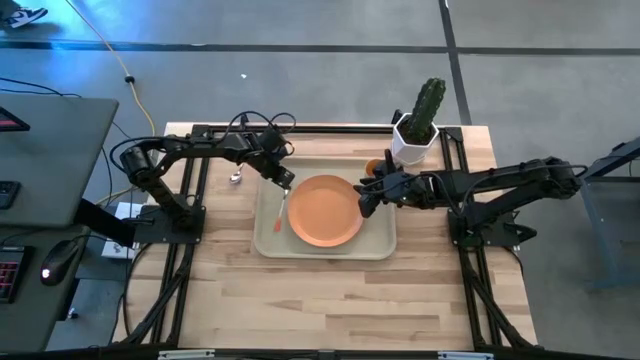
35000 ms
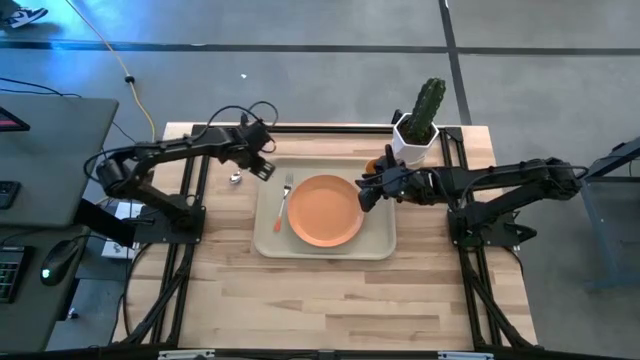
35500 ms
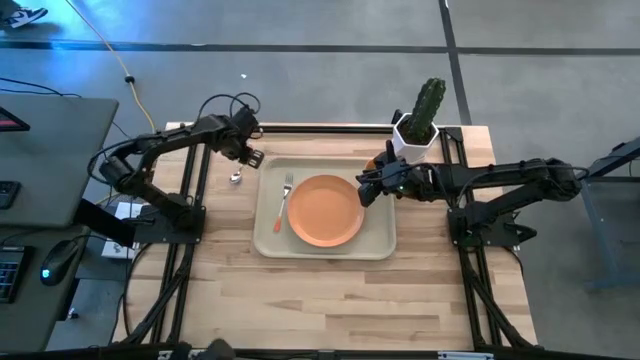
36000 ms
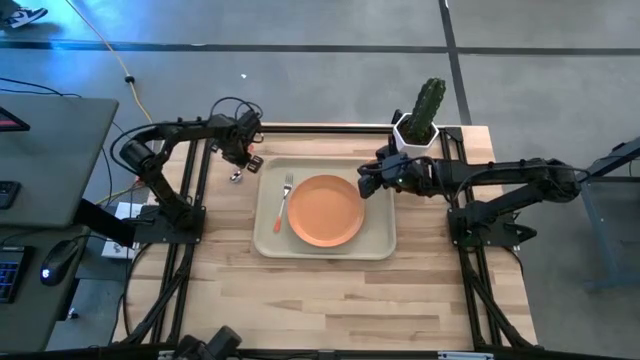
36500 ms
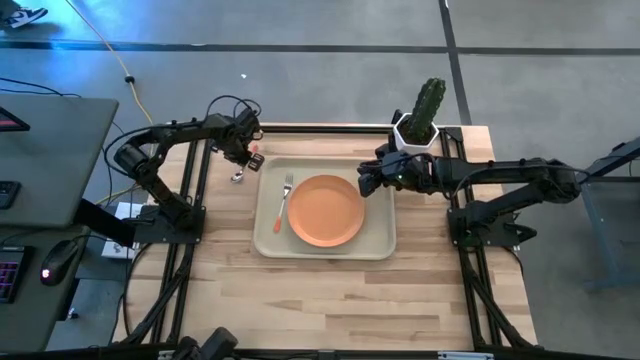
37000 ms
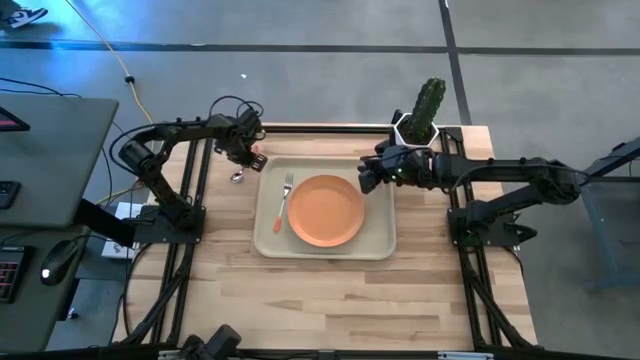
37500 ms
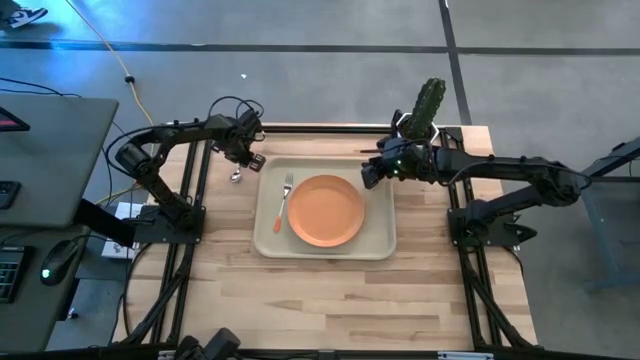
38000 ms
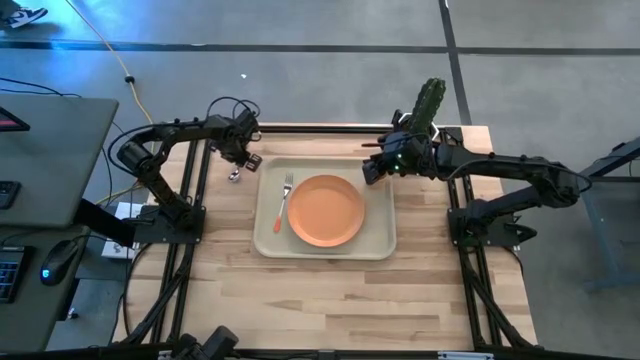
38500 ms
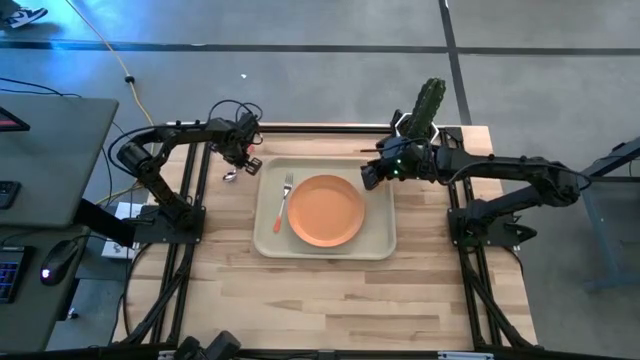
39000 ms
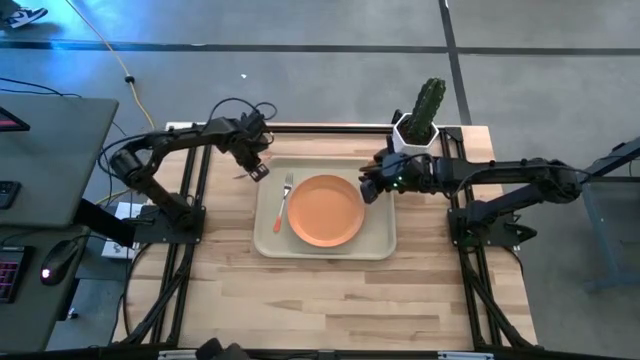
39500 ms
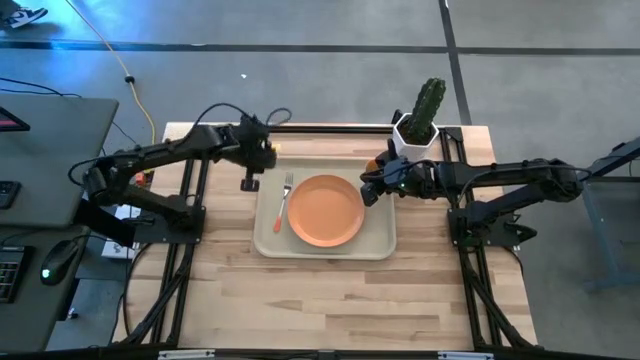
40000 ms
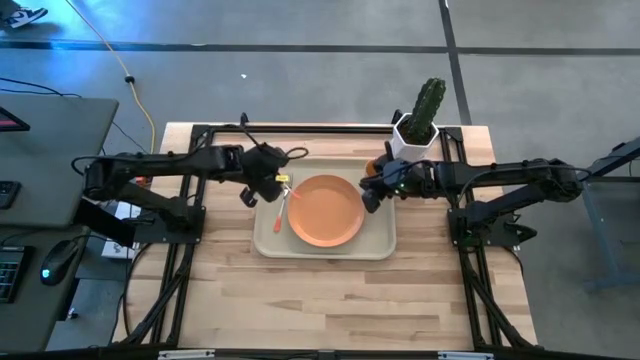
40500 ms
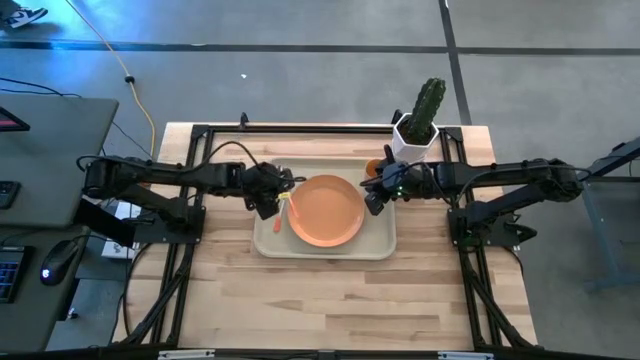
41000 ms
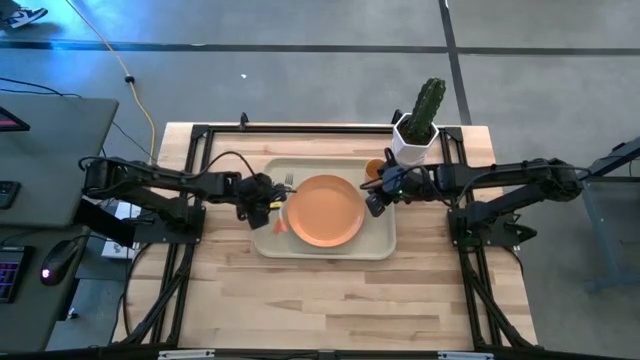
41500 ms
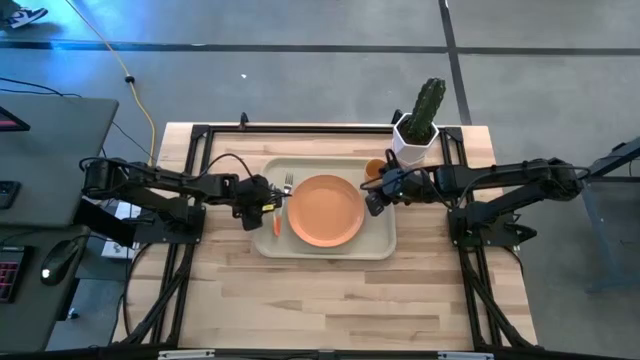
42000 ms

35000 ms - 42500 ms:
Task: Pick and place plate/cup/fork/spoon on tray
Put the orange spoon on the brown tray on the left side of the fork

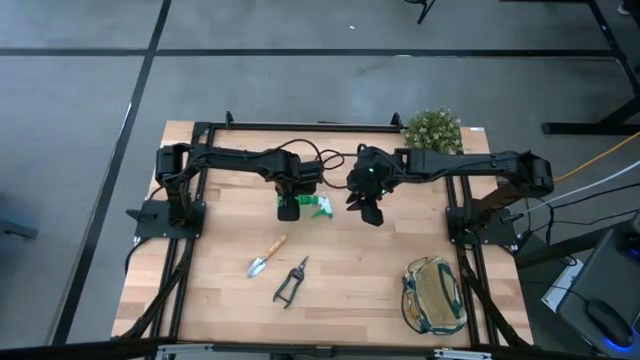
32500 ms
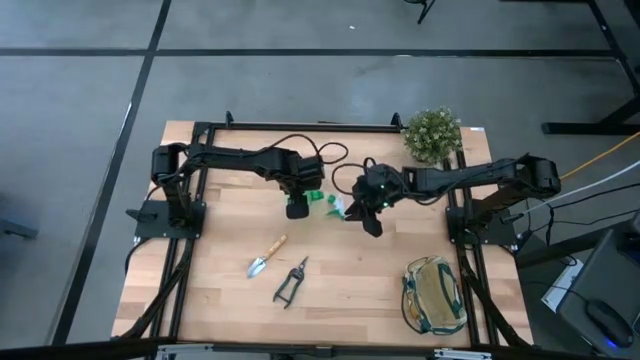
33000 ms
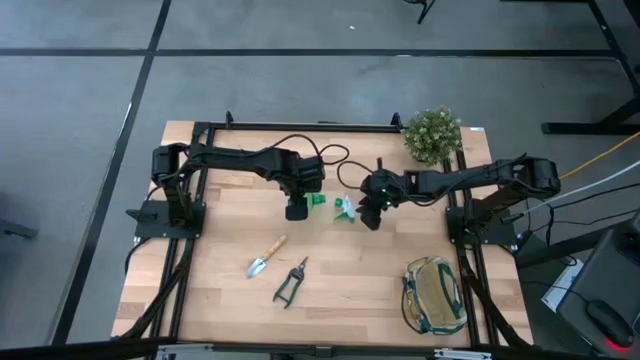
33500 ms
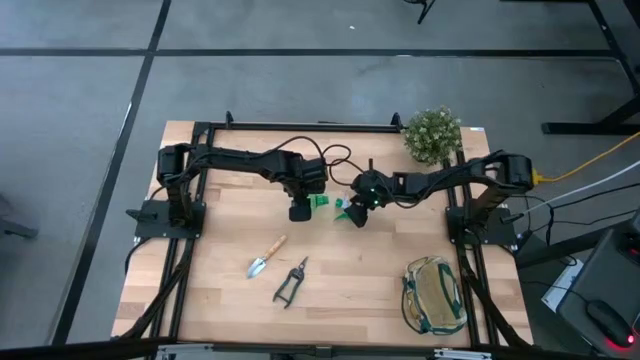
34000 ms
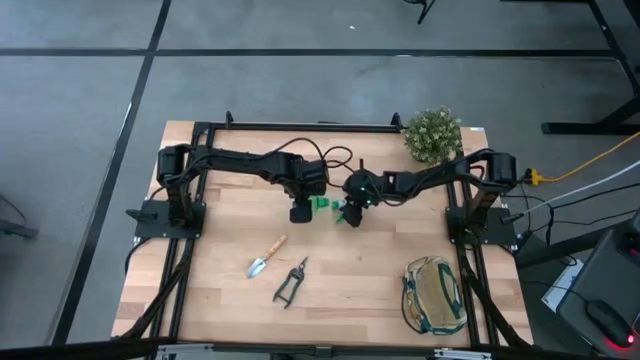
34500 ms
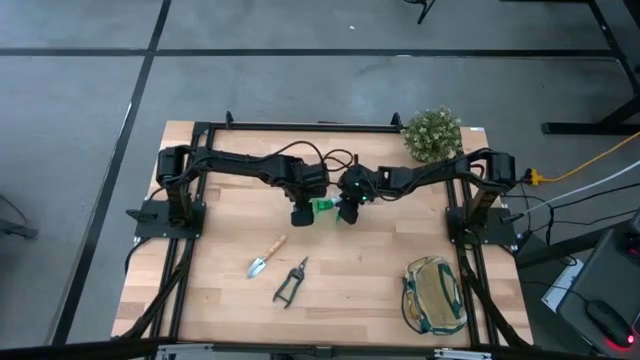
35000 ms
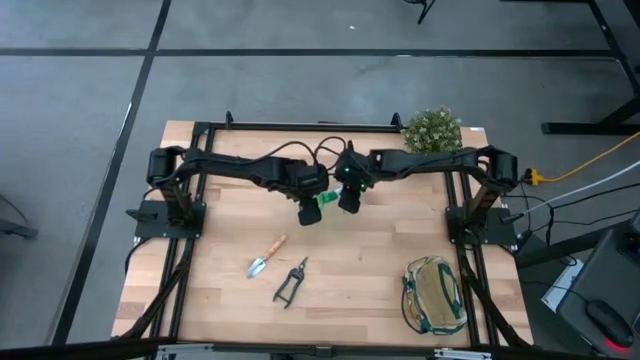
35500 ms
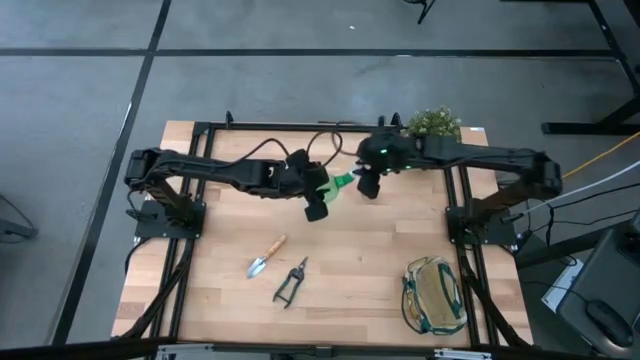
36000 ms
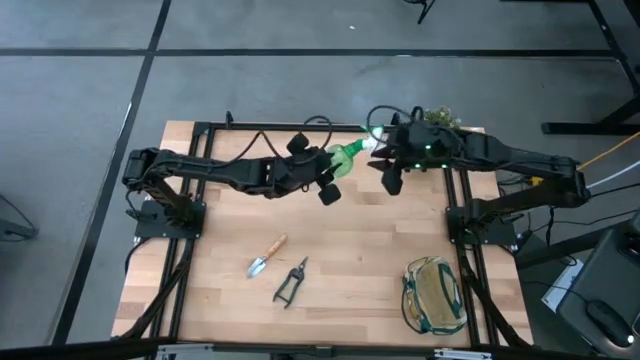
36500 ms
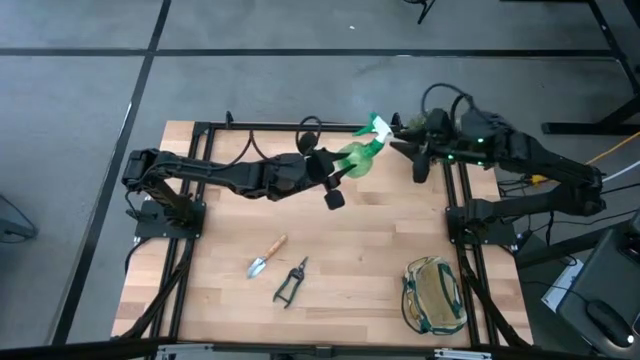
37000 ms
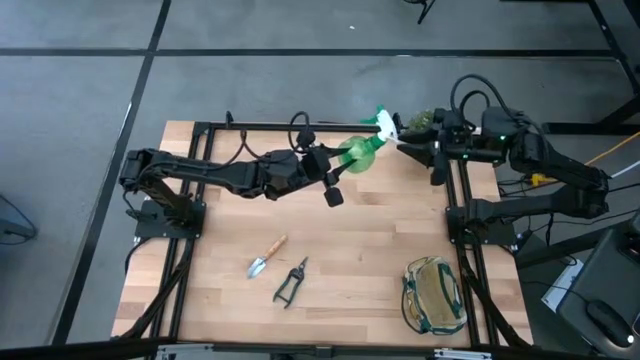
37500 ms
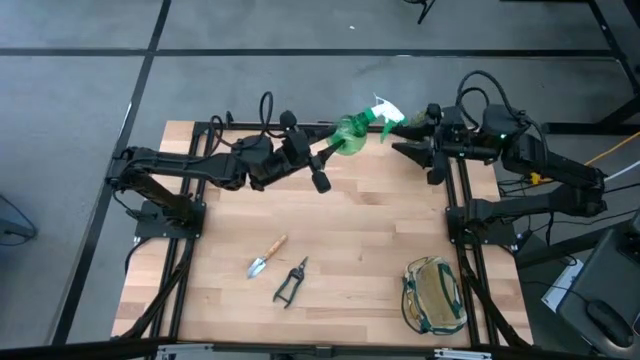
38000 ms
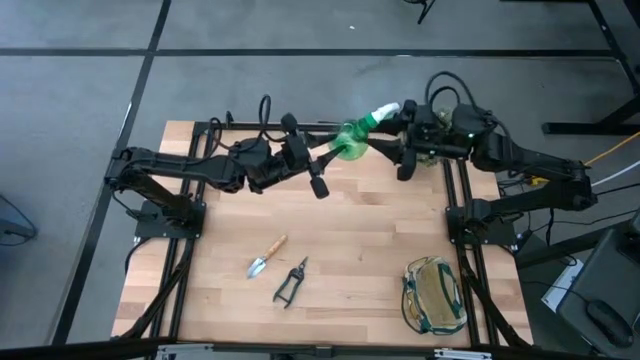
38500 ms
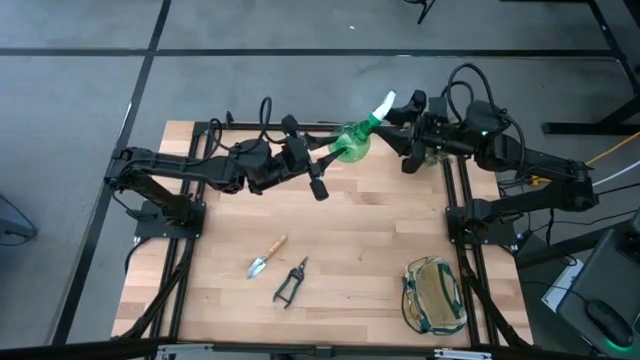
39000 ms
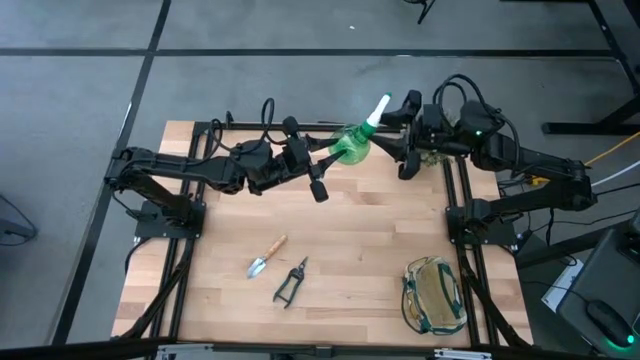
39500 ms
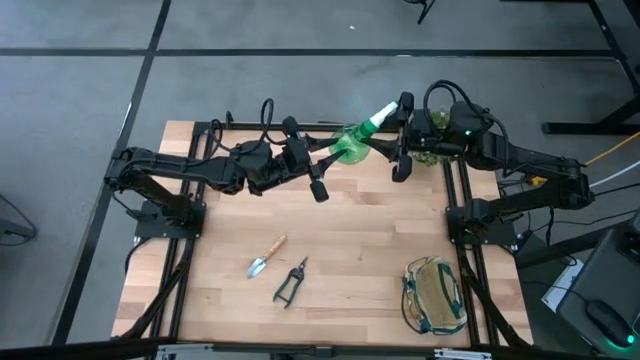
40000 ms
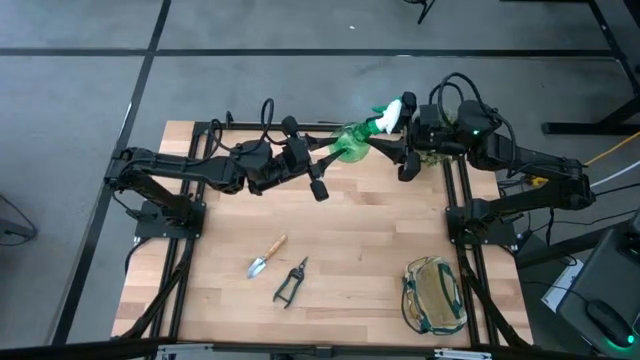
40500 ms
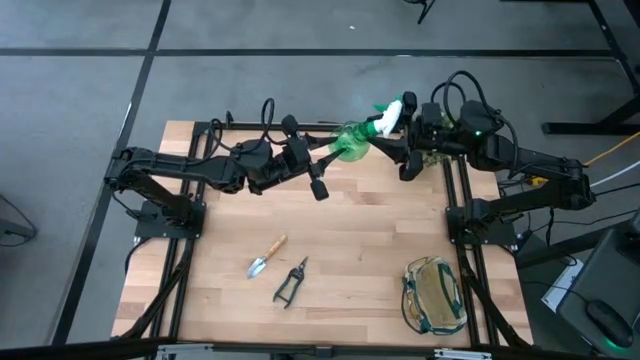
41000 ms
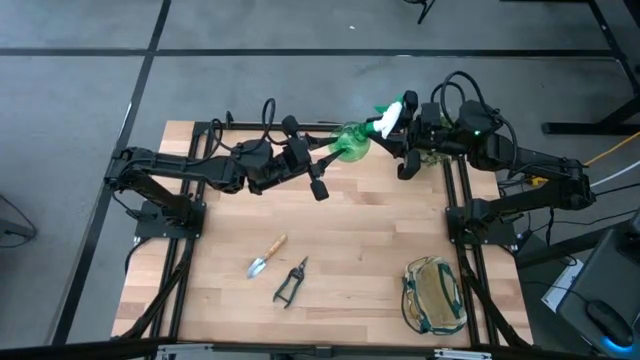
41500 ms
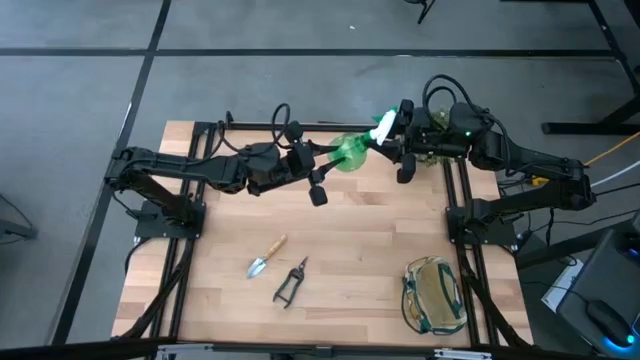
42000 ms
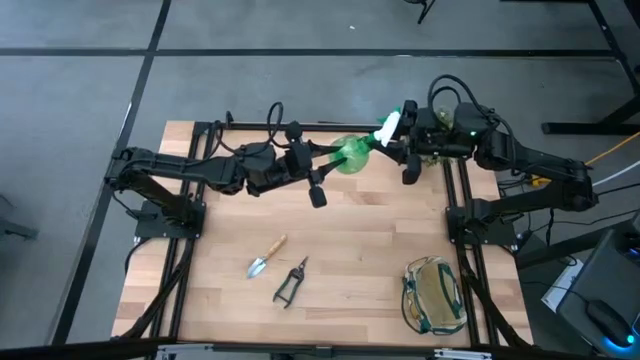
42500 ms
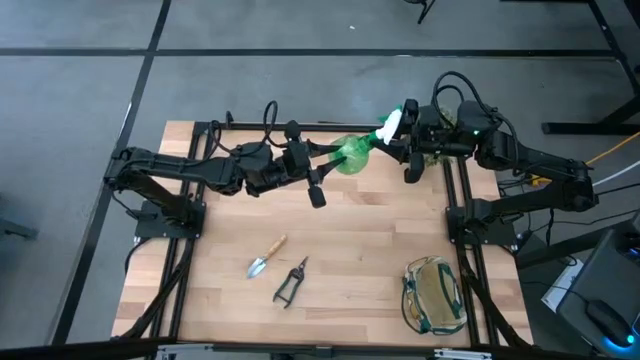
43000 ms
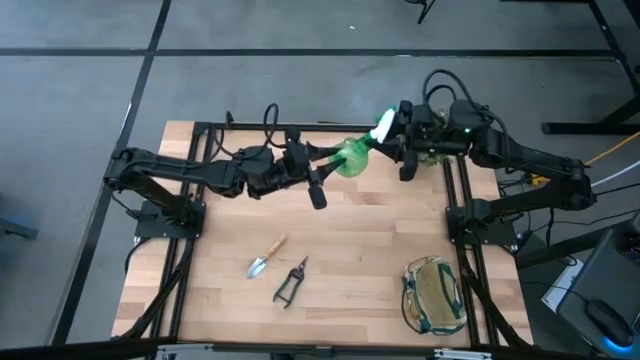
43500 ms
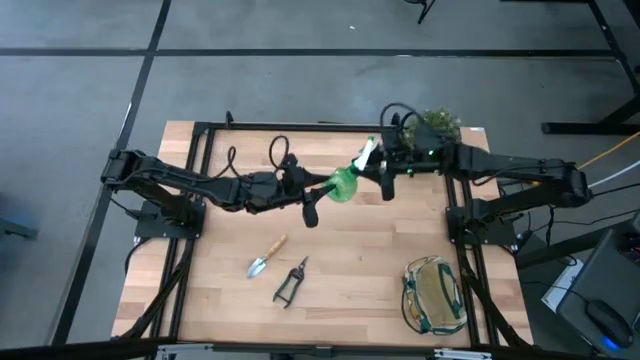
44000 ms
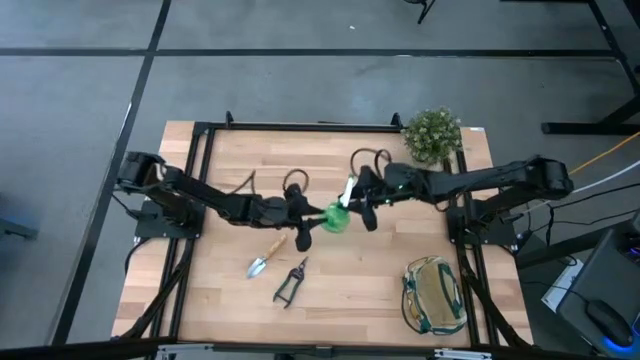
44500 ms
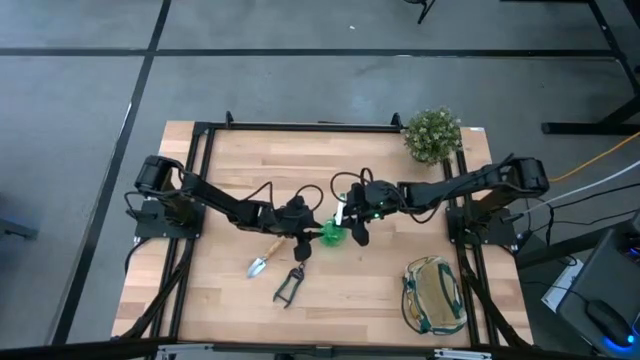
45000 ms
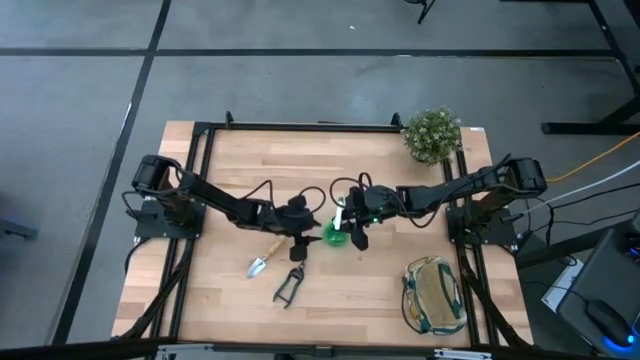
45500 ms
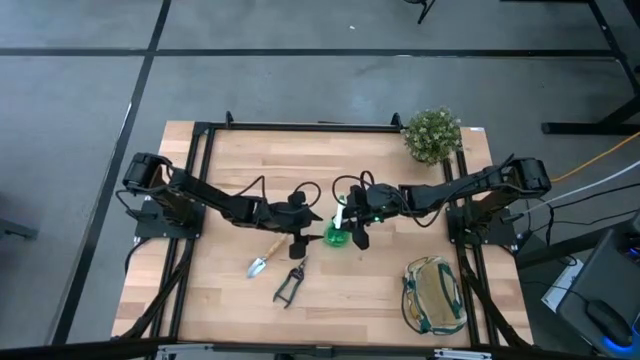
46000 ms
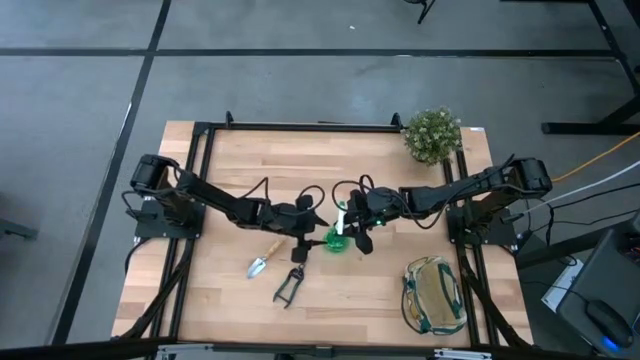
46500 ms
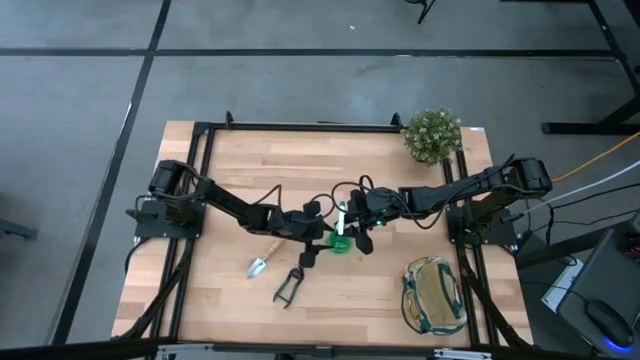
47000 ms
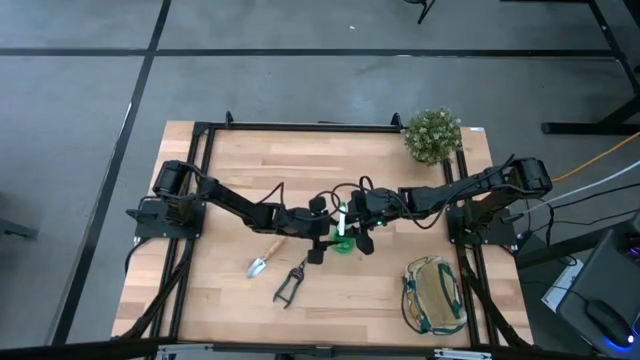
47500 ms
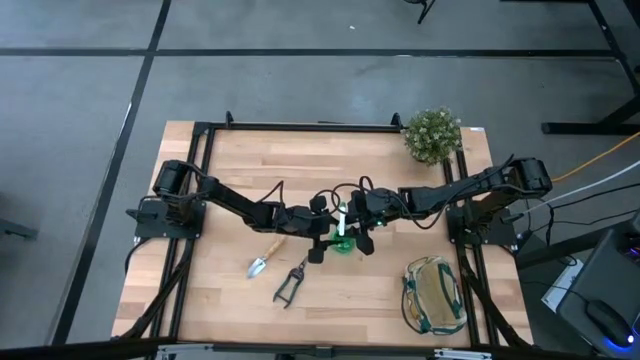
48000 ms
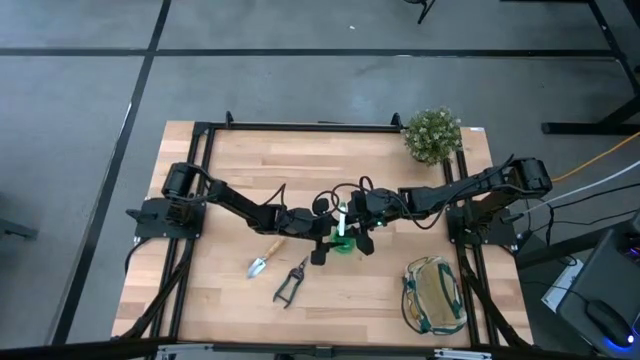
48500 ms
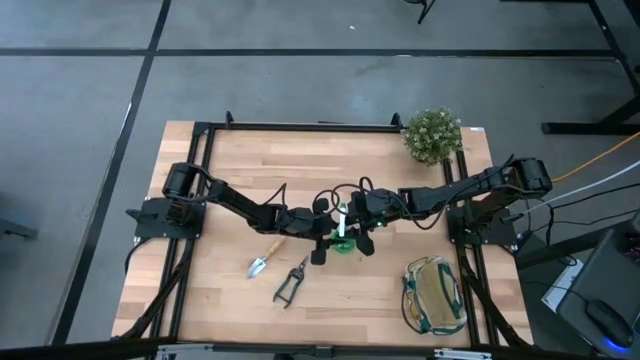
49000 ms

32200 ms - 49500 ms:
Task: Pick & Place Garden tools in Gardening bag
Put the green spray bottle into the gardening bag
